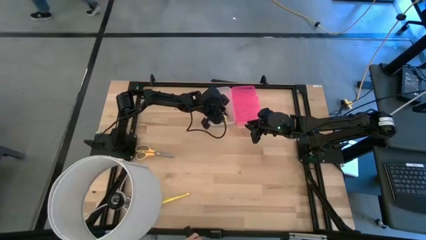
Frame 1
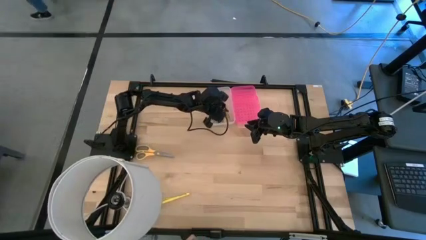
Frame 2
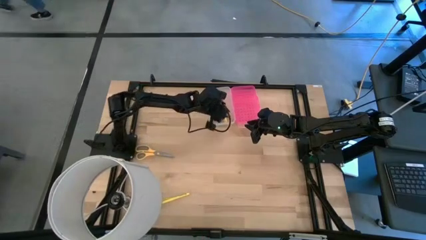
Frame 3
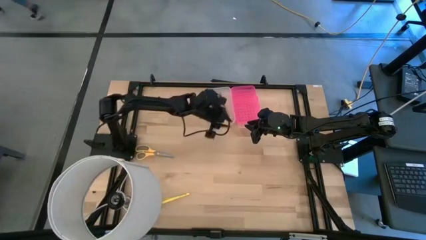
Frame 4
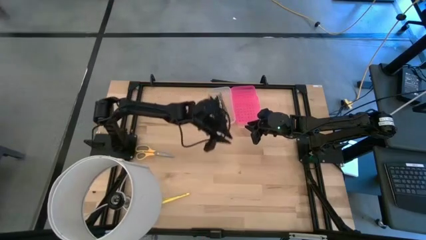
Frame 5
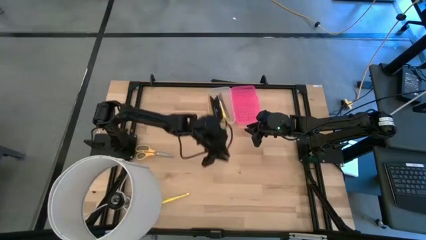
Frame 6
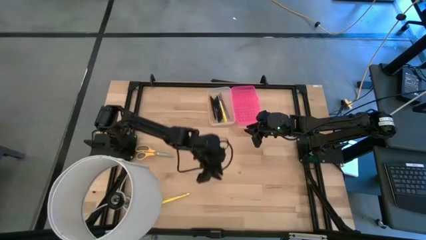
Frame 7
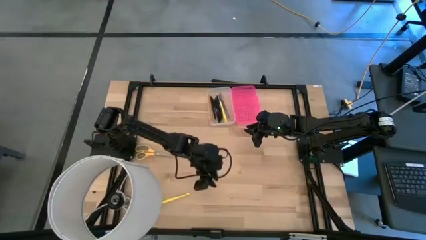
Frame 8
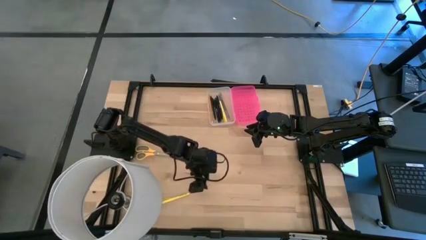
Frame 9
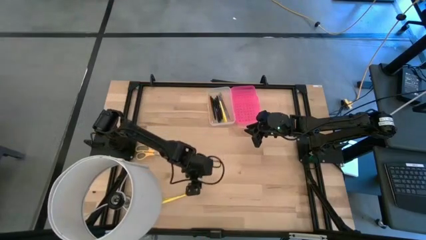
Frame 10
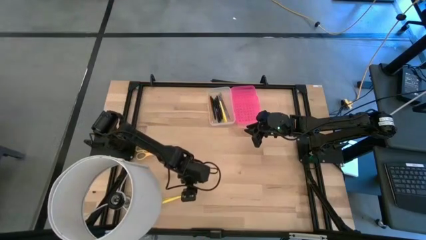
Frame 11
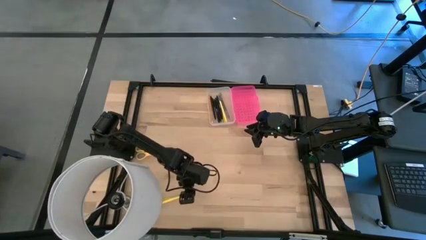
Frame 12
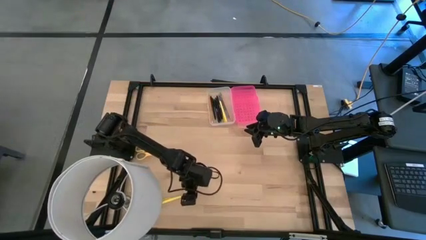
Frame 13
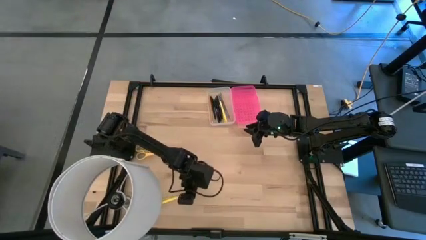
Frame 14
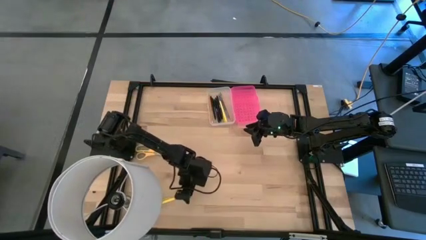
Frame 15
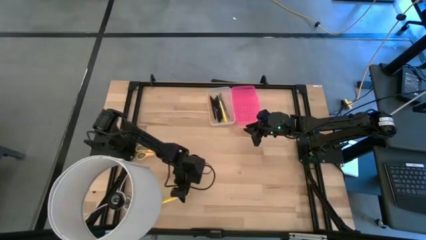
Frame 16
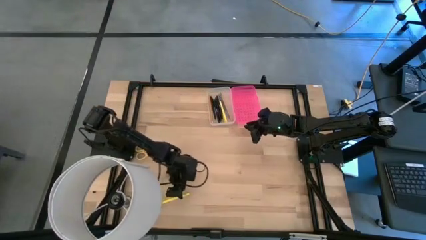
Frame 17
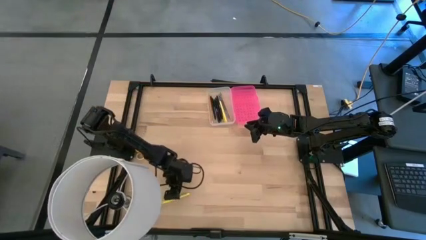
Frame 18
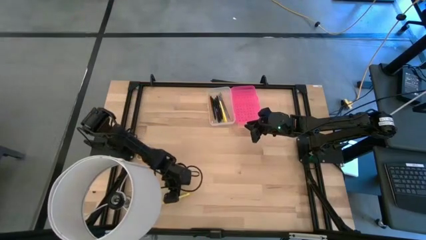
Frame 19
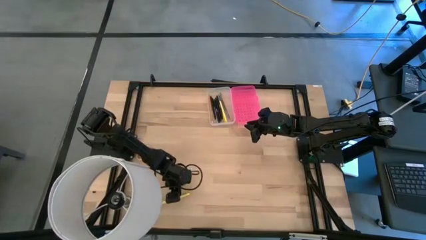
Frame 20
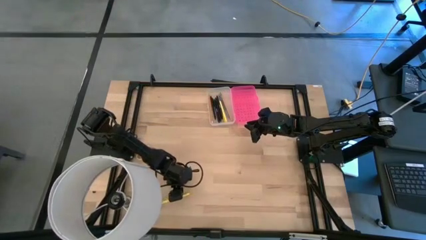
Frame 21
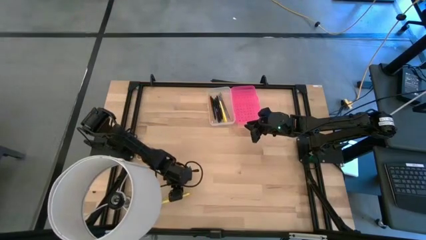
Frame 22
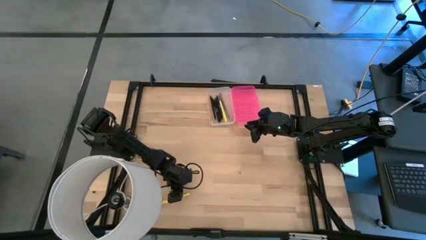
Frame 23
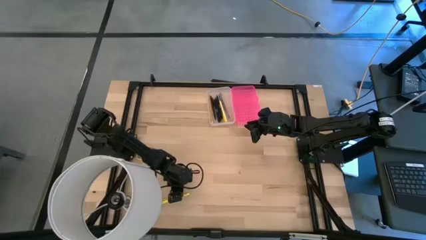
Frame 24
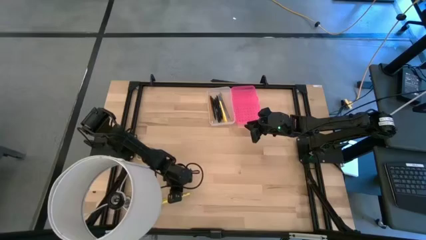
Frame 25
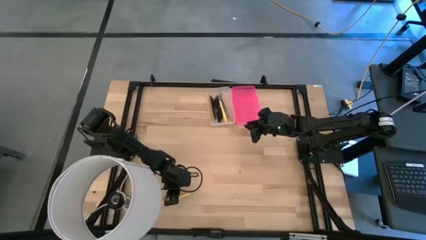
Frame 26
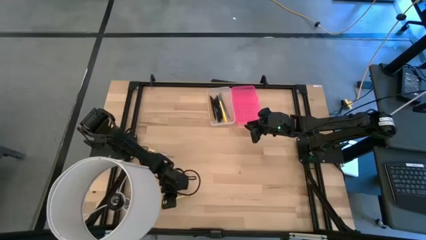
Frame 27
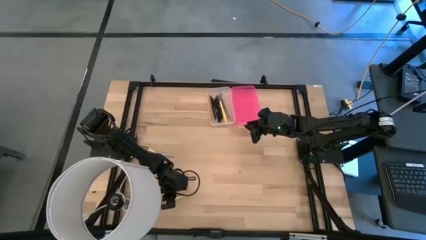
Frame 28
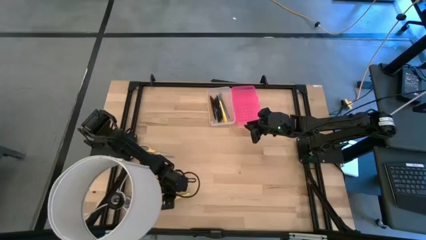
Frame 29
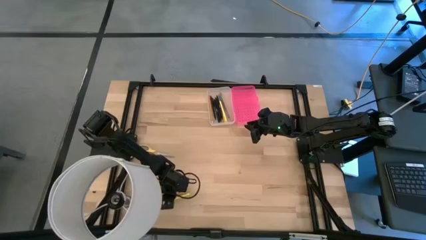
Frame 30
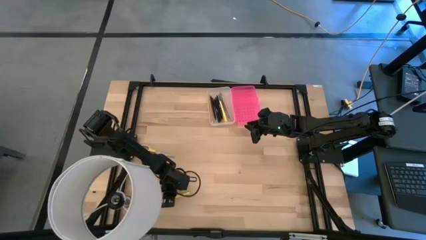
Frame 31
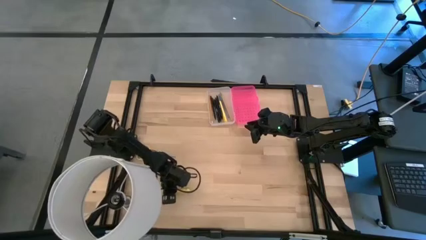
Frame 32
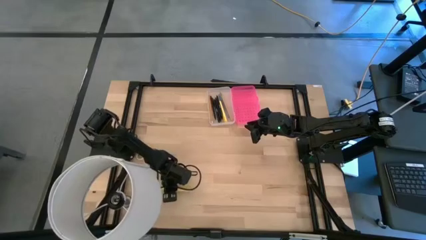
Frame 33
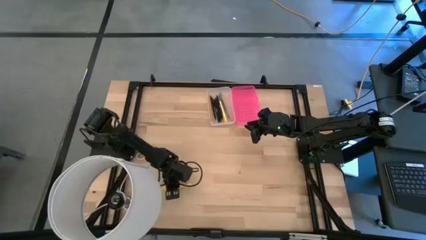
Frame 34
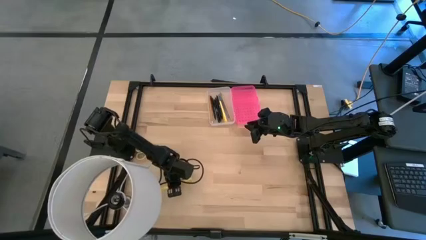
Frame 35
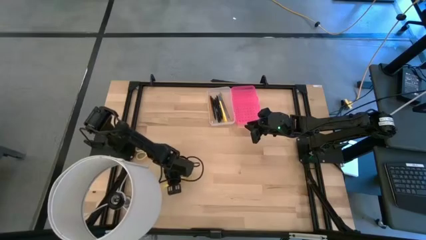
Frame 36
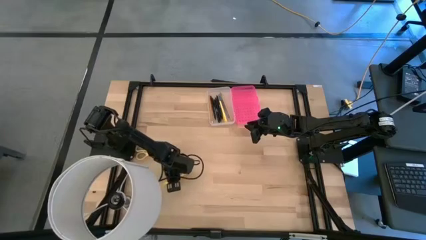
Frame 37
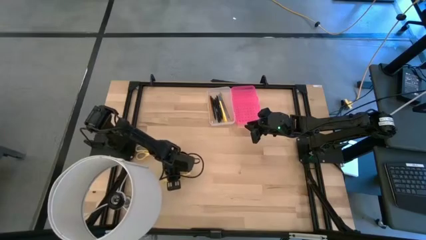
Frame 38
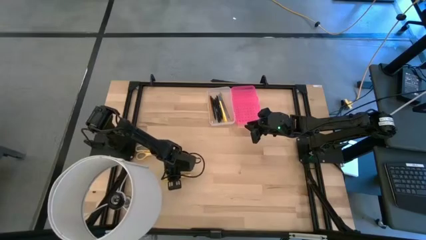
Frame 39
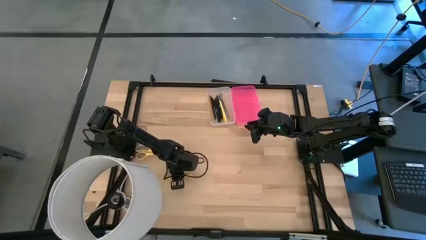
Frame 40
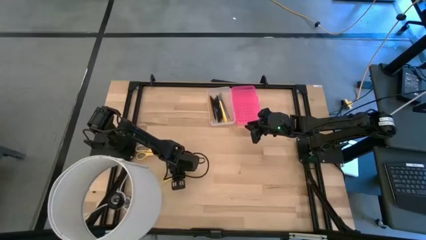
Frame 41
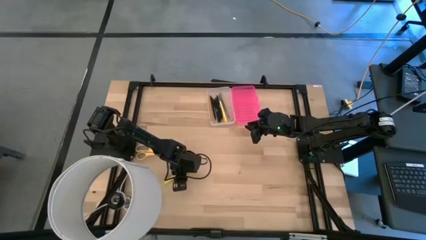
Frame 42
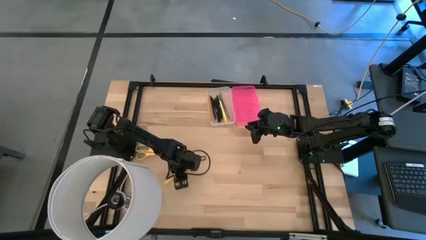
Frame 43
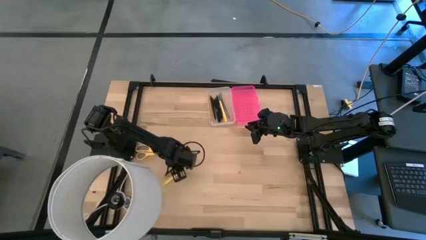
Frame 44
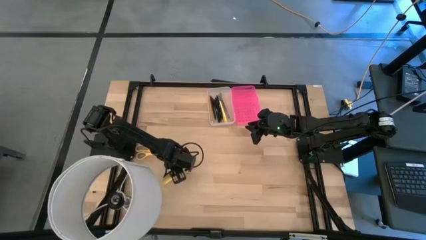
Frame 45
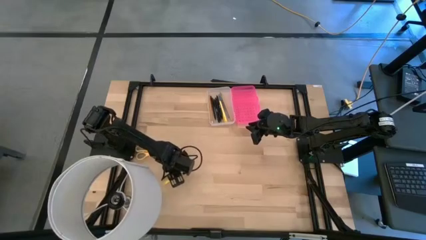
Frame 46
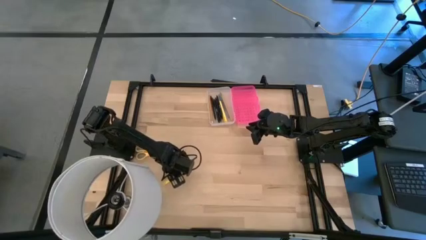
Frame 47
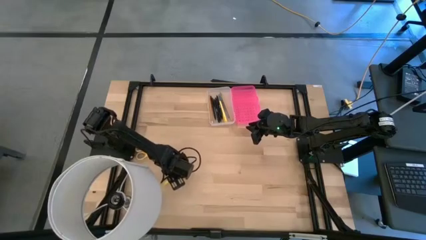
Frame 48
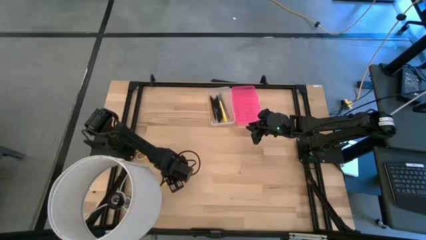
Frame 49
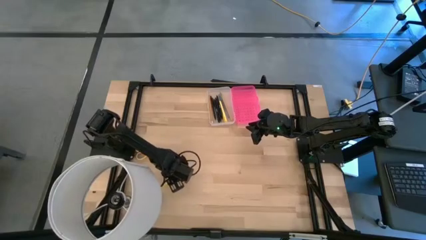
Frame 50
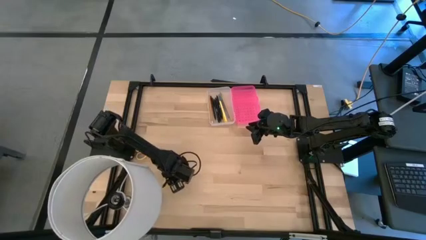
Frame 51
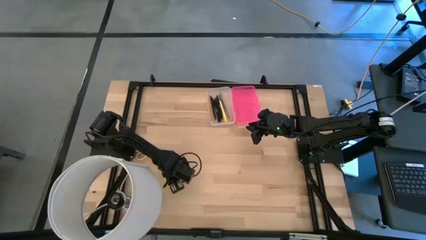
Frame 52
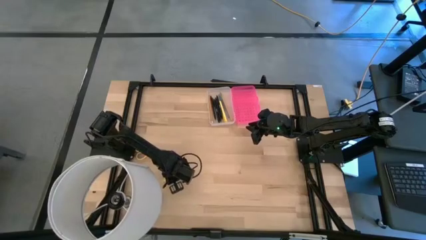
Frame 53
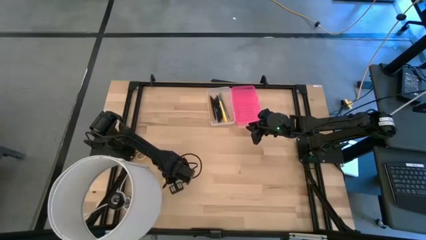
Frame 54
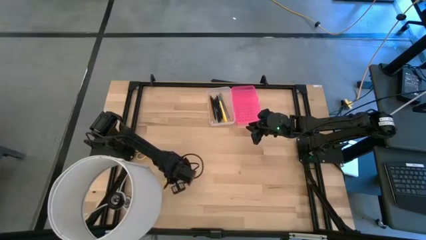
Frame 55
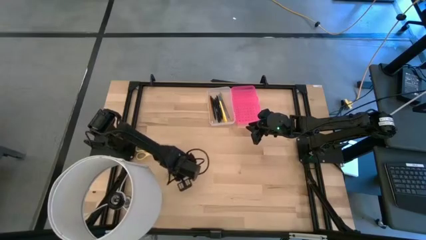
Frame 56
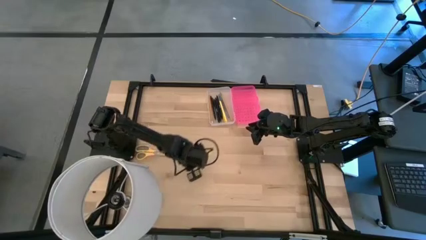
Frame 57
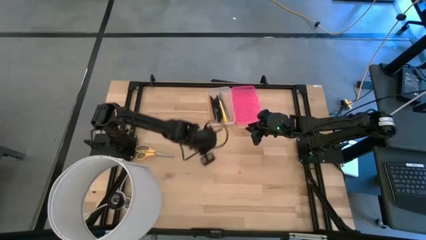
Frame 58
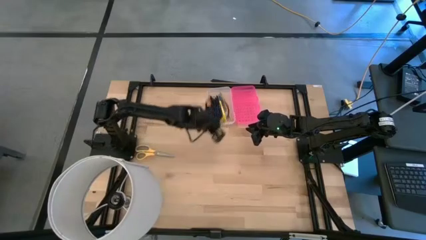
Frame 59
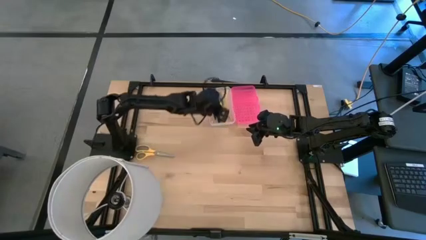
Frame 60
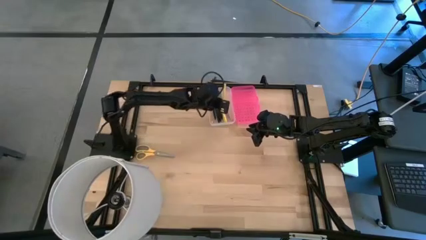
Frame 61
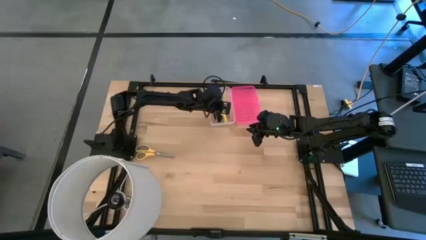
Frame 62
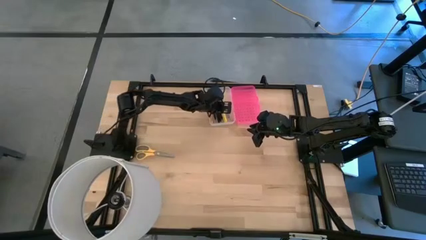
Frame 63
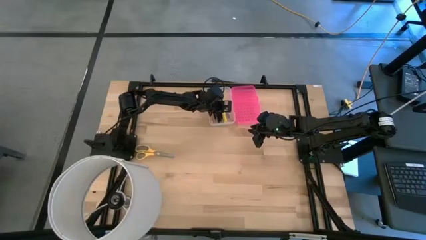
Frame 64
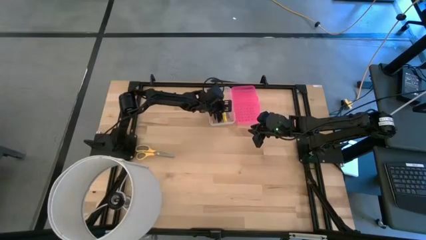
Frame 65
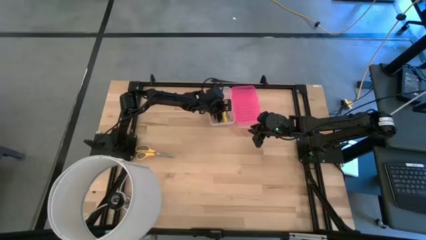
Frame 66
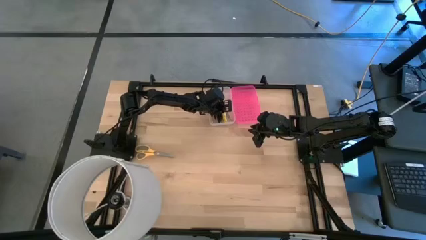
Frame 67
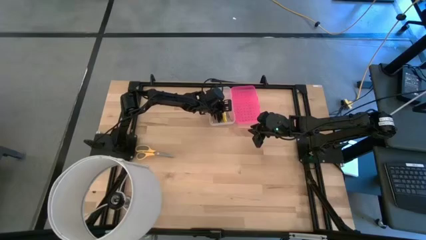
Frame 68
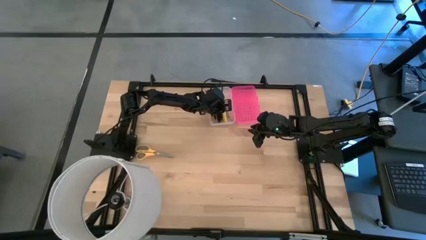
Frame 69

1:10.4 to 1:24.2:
Task: Pick & place school supplies into a supply box
Put the yellow pen into the transparent supply box
